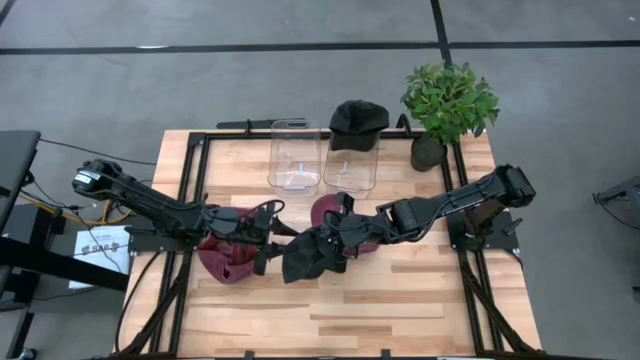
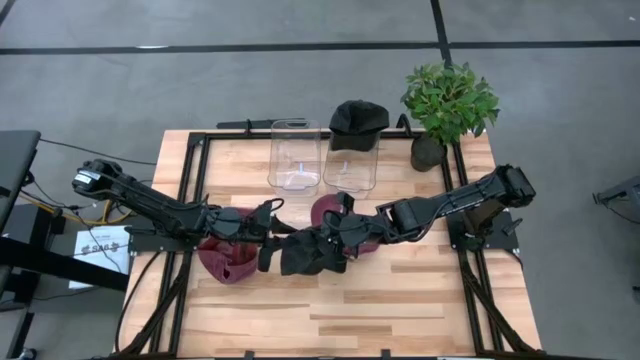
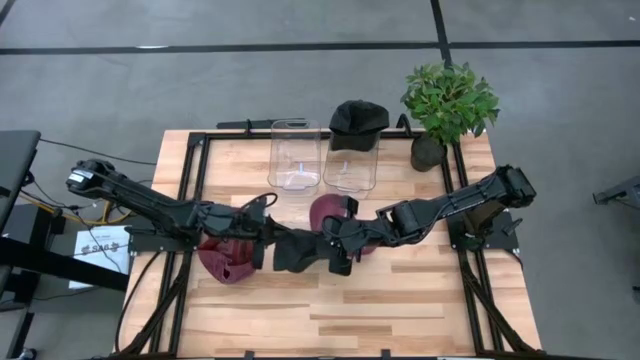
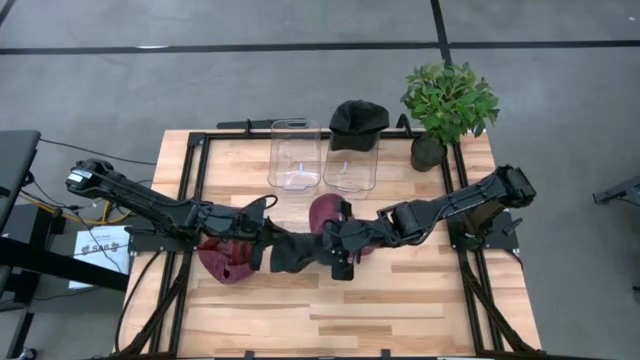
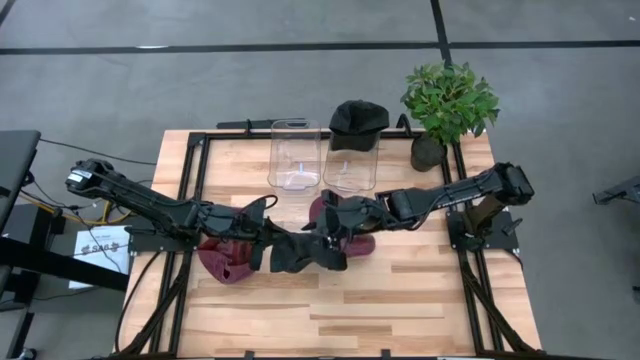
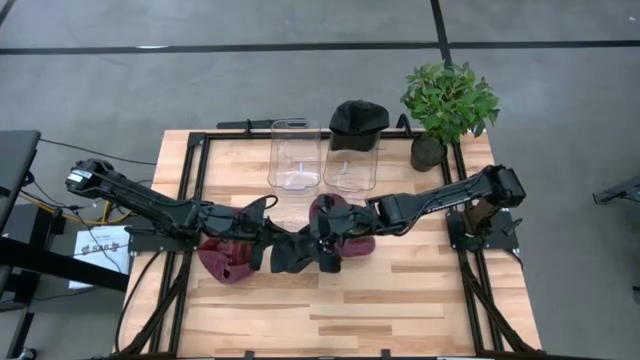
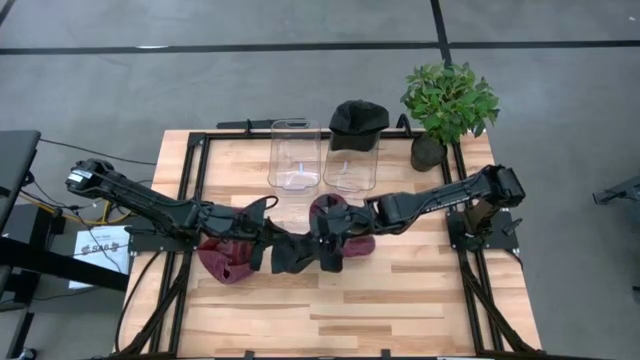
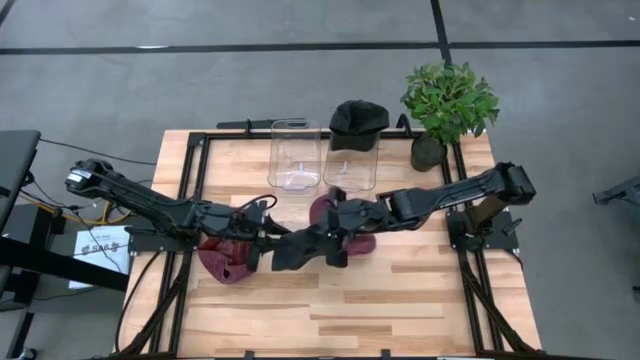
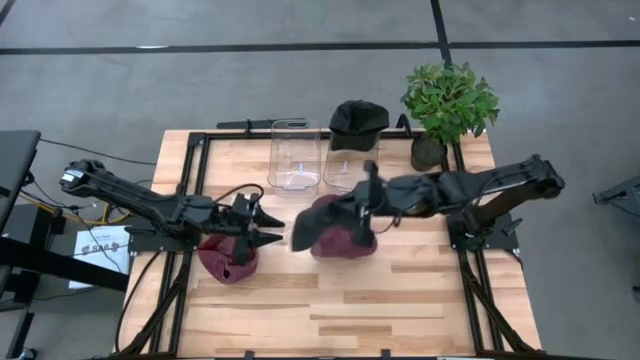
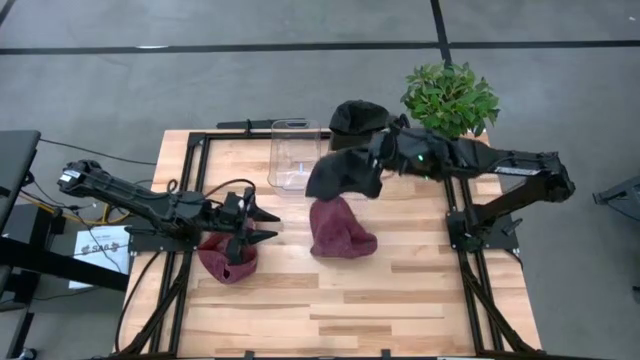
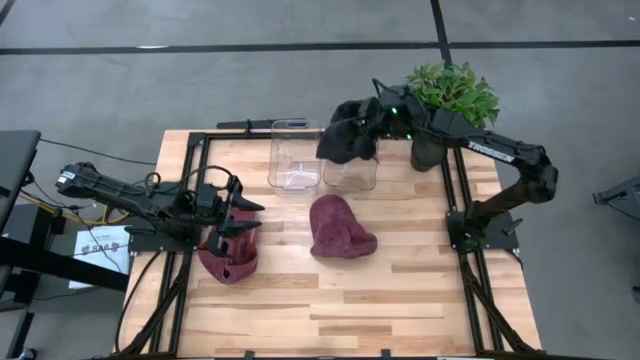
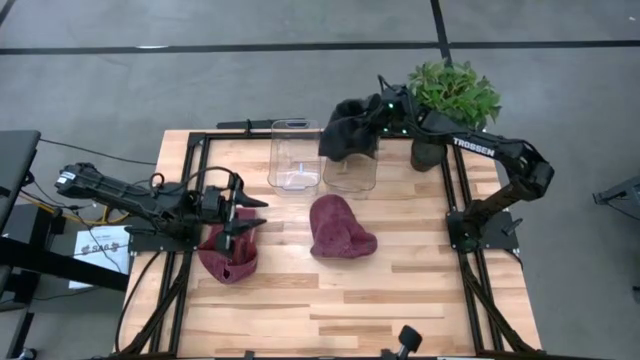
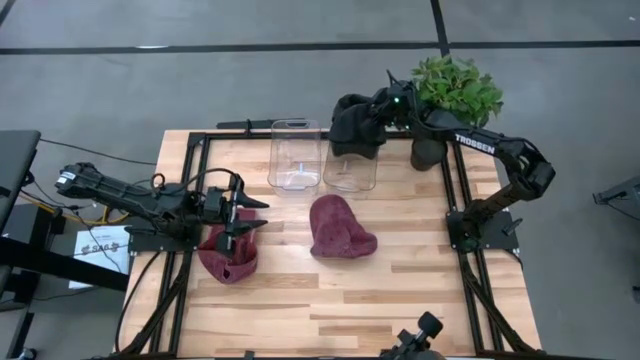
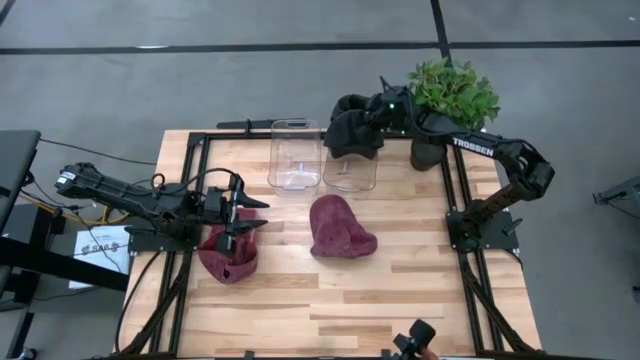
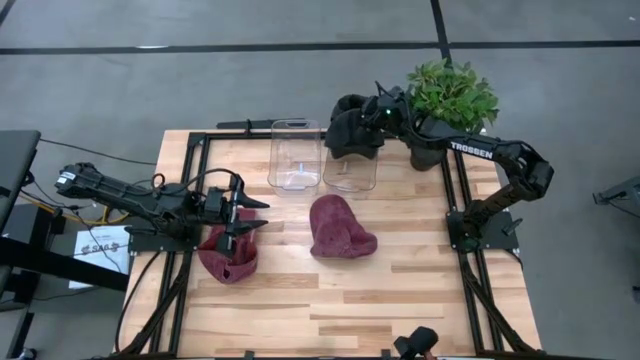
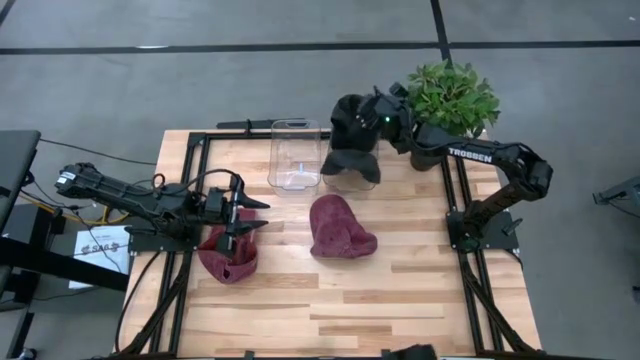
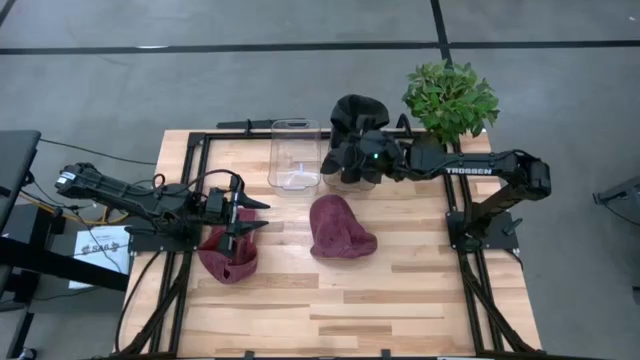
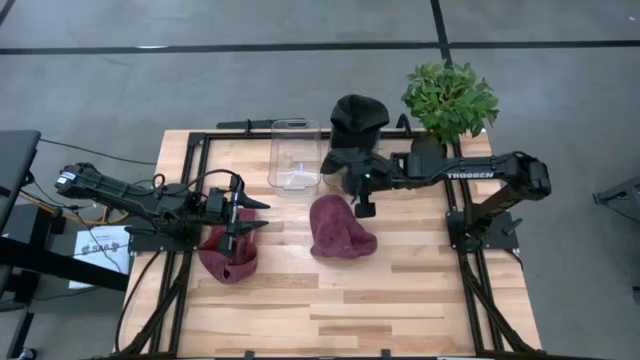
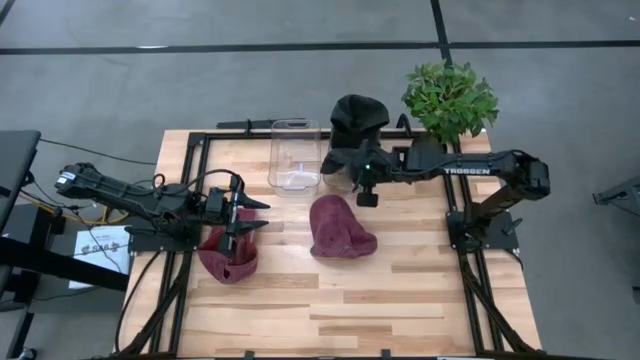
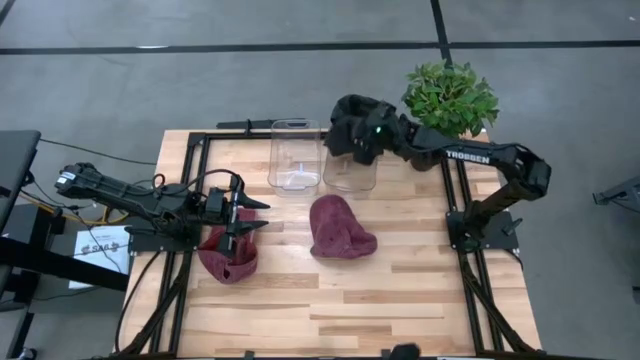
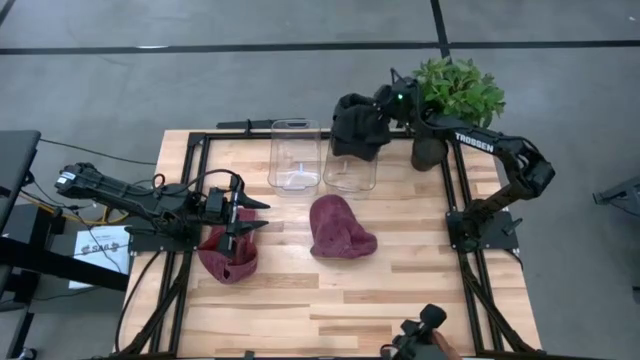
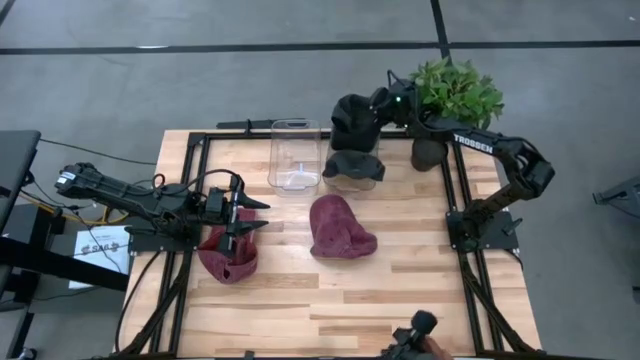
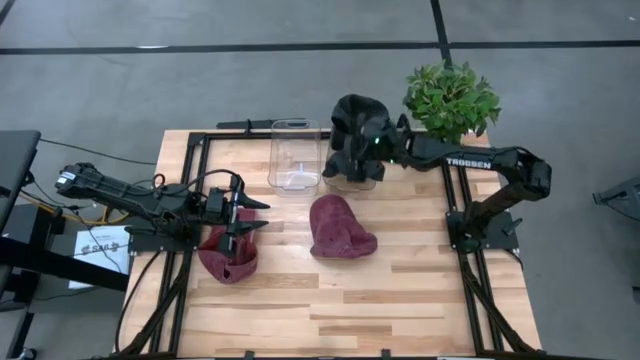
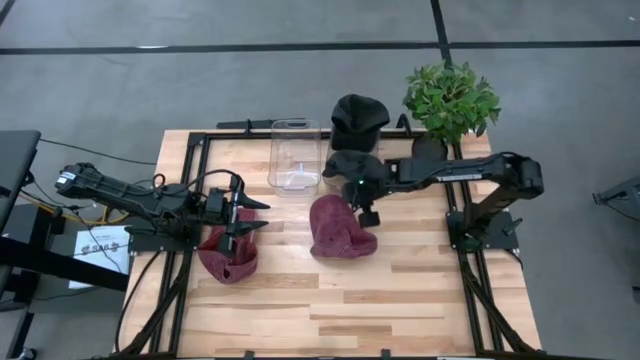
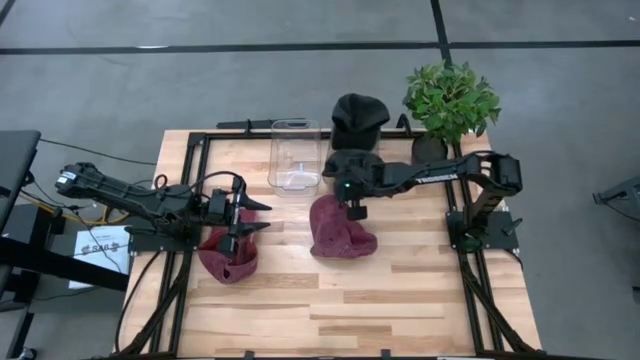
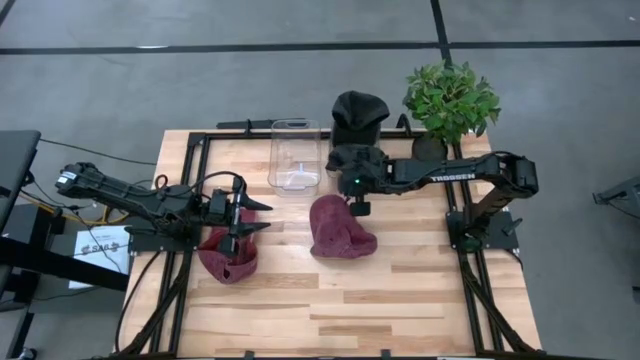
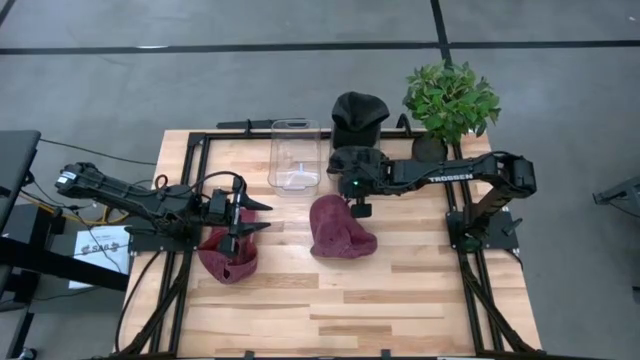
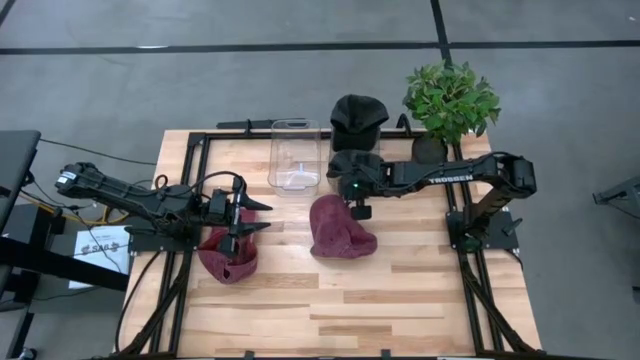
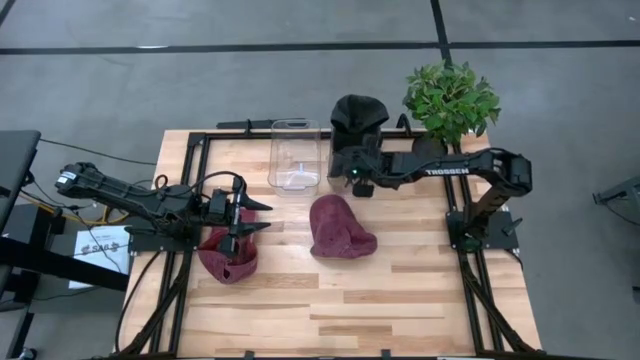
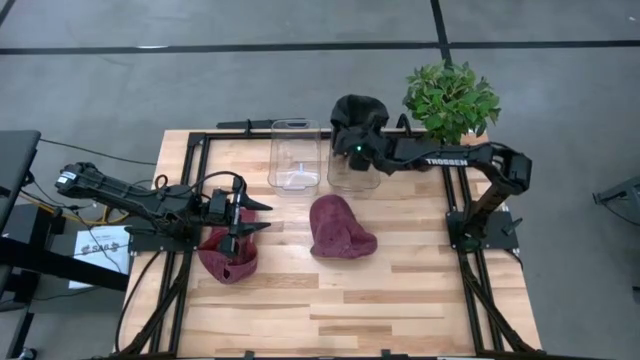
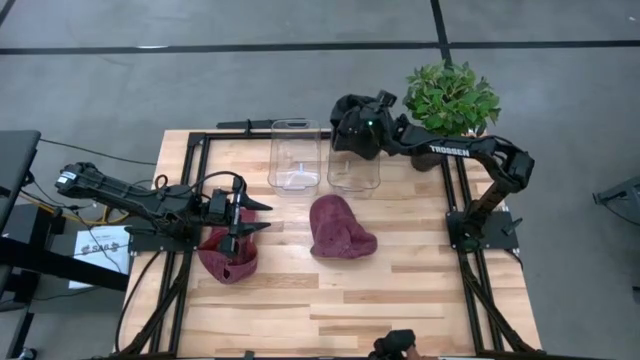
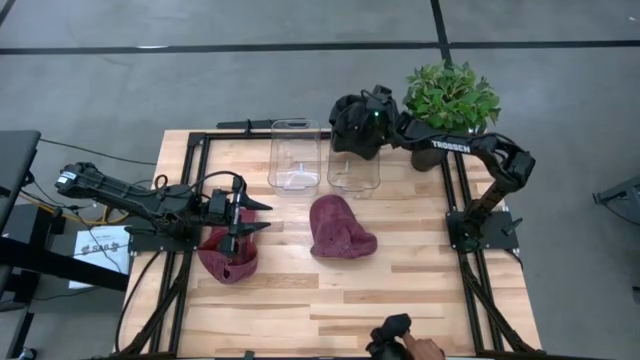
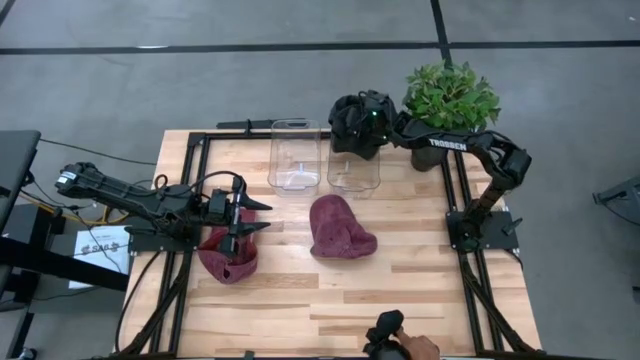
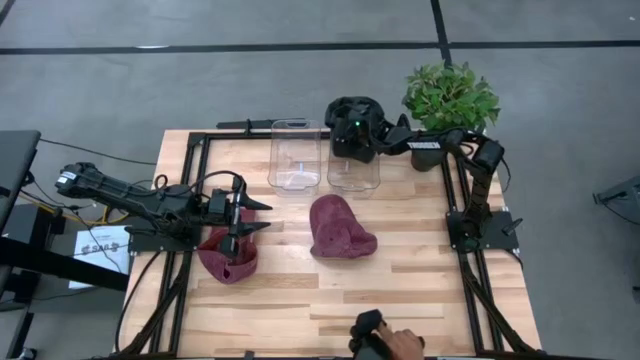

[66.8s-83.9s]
Task: Pick & Place hat
Put the black cap into the right transparent bin
